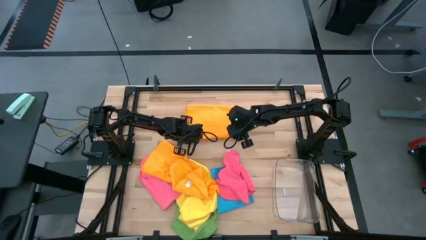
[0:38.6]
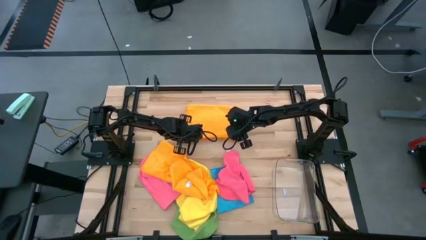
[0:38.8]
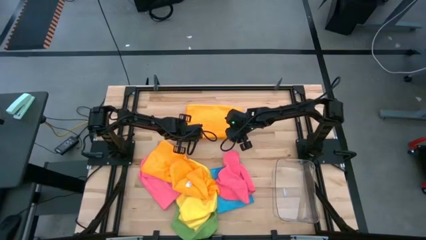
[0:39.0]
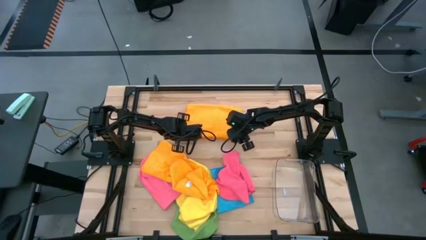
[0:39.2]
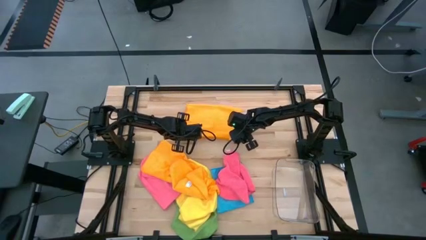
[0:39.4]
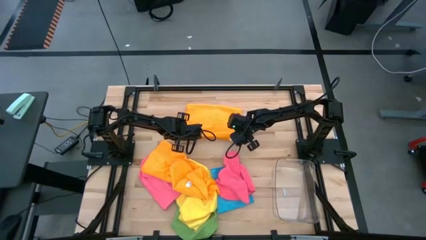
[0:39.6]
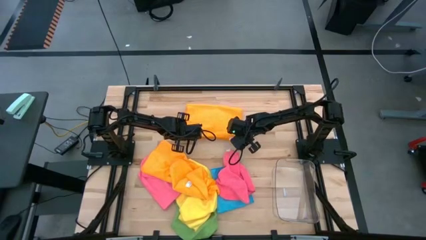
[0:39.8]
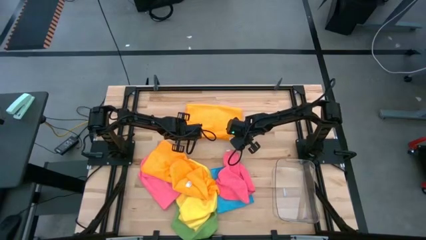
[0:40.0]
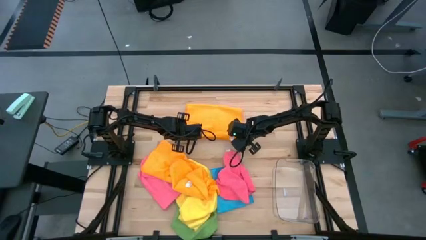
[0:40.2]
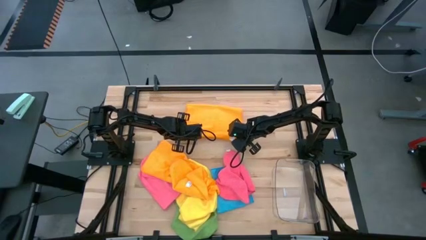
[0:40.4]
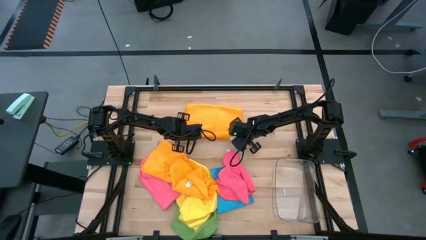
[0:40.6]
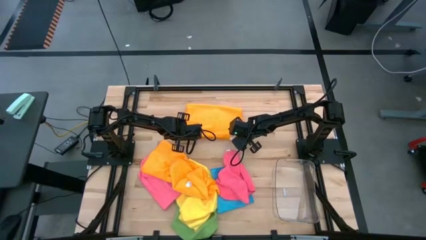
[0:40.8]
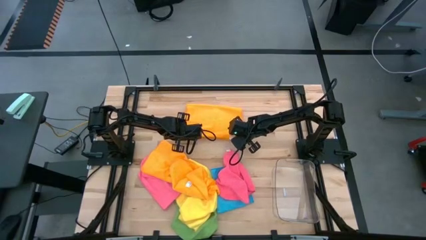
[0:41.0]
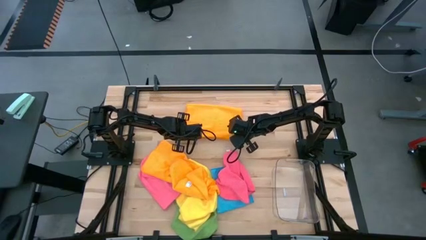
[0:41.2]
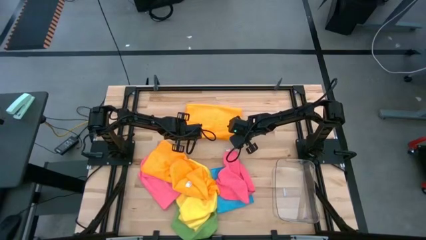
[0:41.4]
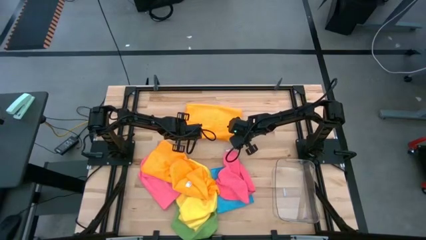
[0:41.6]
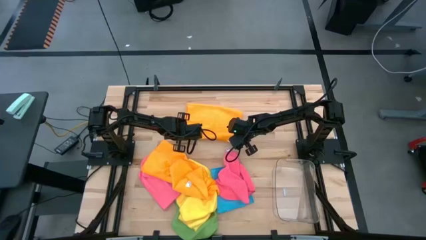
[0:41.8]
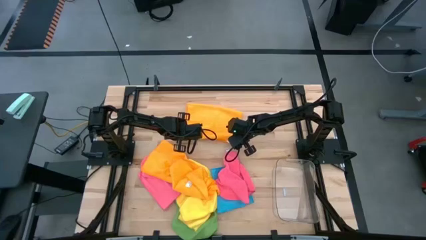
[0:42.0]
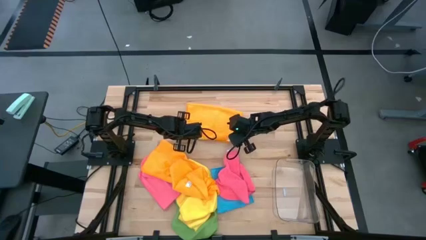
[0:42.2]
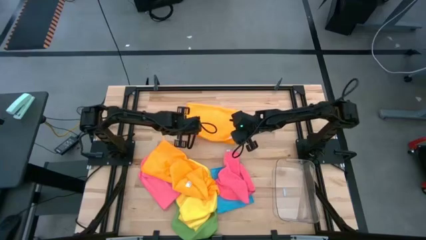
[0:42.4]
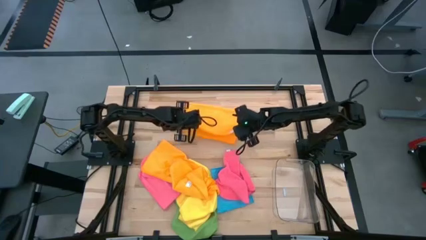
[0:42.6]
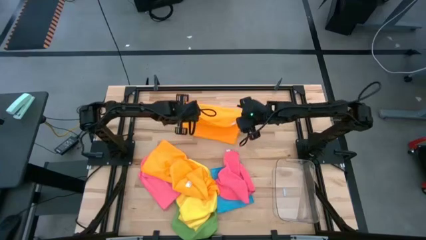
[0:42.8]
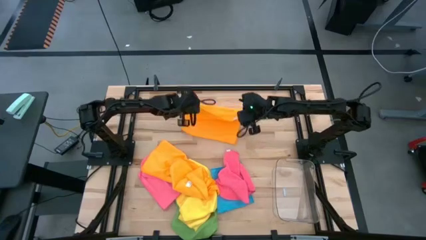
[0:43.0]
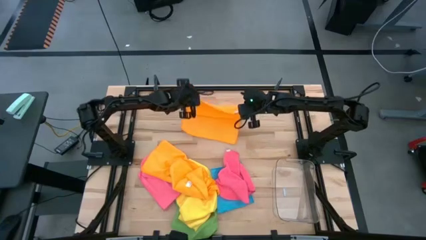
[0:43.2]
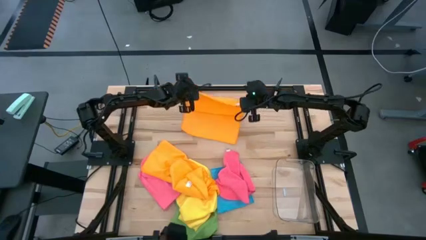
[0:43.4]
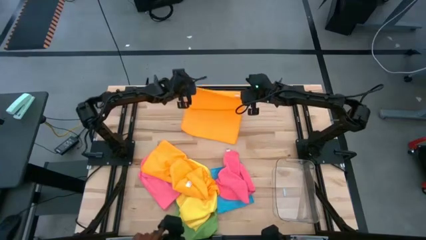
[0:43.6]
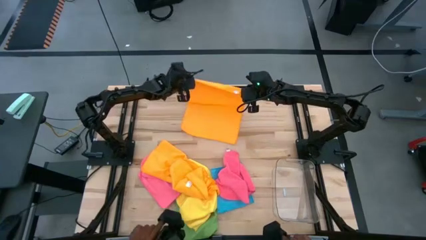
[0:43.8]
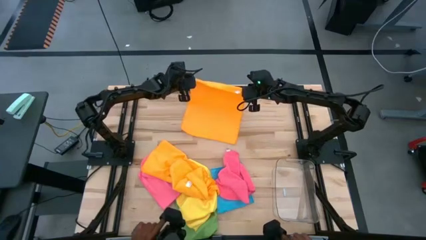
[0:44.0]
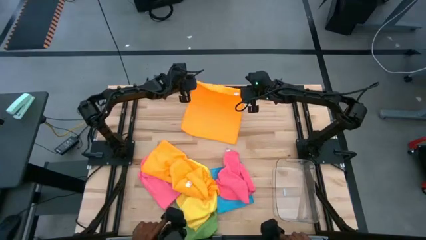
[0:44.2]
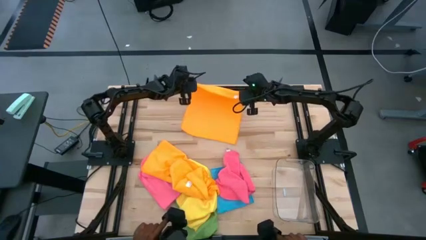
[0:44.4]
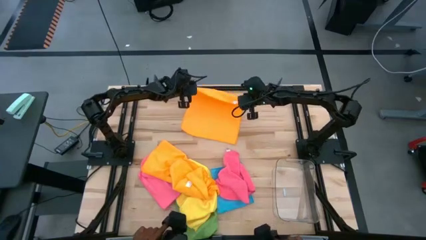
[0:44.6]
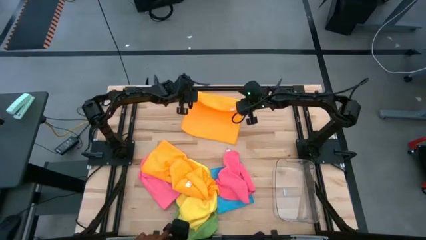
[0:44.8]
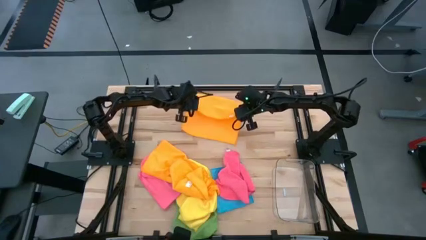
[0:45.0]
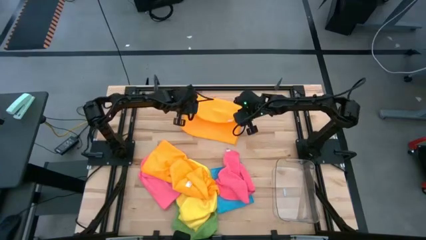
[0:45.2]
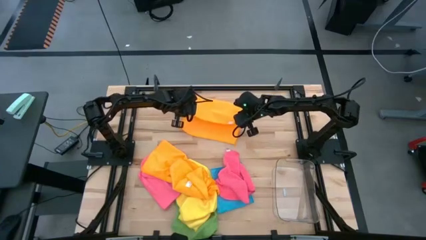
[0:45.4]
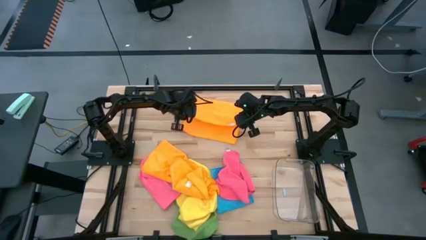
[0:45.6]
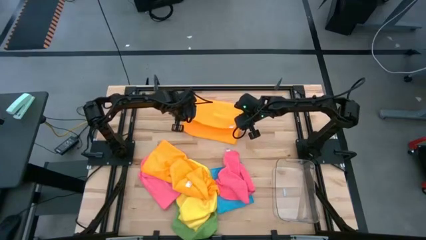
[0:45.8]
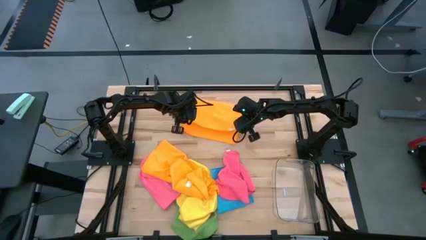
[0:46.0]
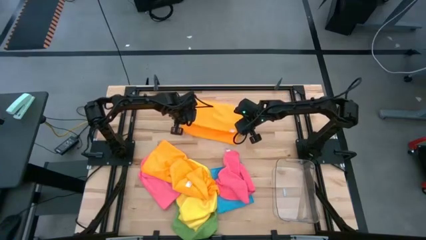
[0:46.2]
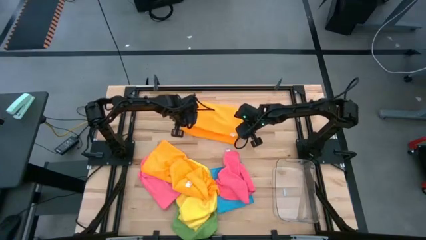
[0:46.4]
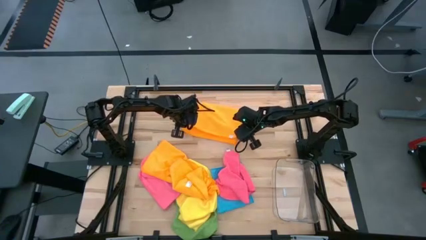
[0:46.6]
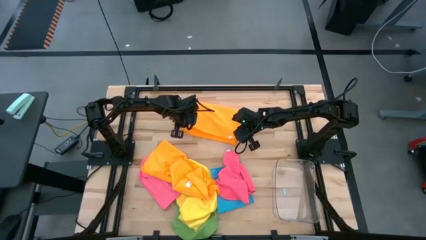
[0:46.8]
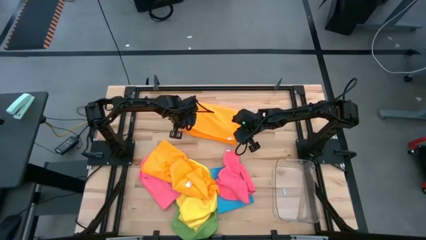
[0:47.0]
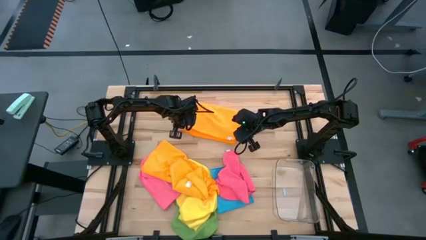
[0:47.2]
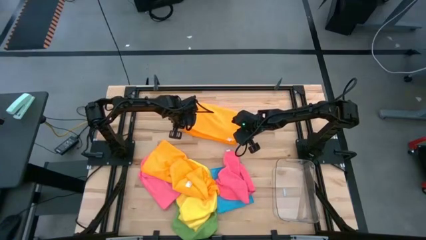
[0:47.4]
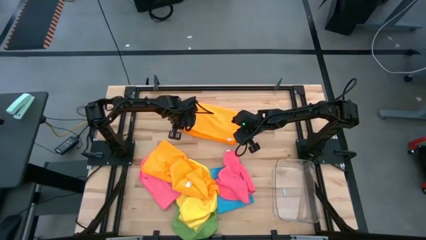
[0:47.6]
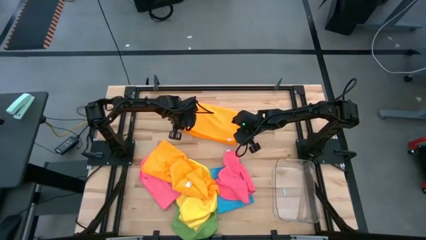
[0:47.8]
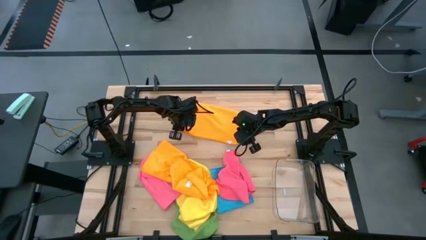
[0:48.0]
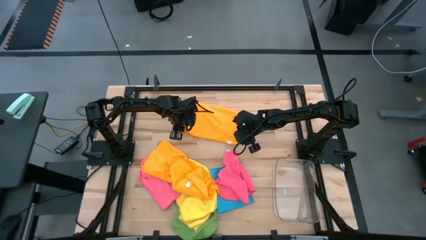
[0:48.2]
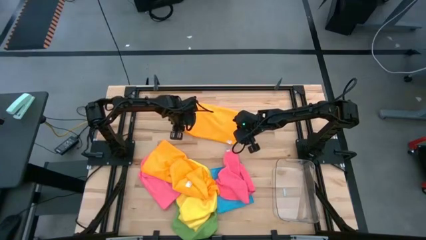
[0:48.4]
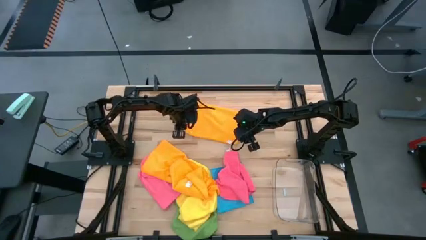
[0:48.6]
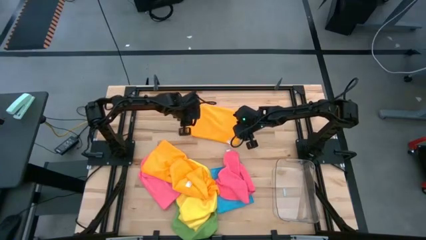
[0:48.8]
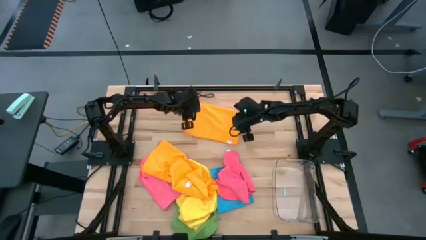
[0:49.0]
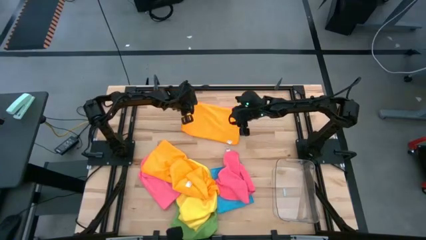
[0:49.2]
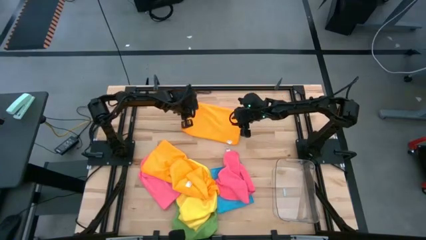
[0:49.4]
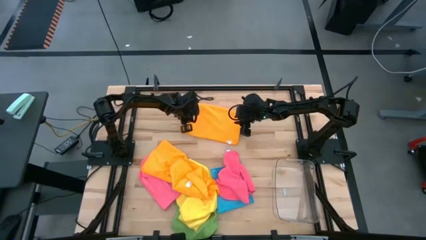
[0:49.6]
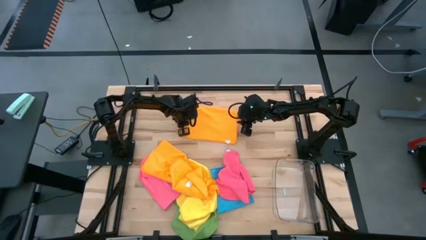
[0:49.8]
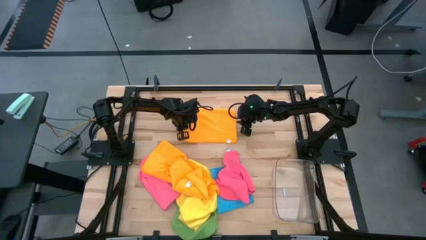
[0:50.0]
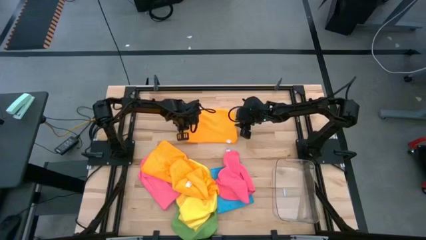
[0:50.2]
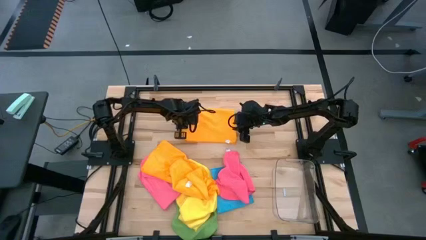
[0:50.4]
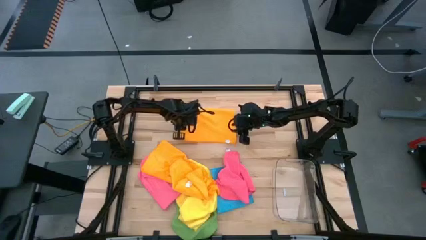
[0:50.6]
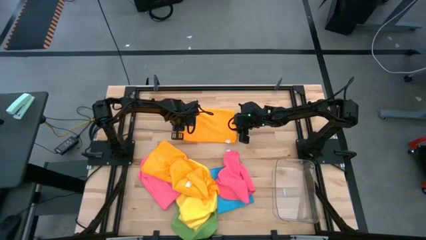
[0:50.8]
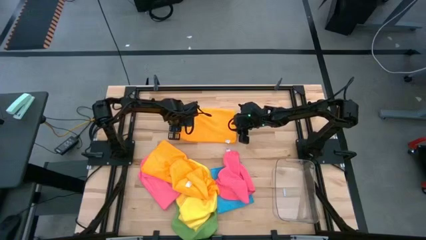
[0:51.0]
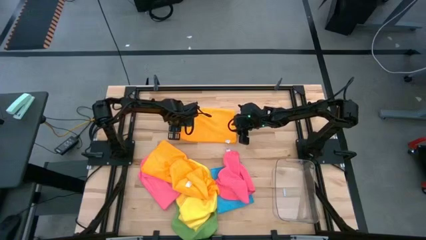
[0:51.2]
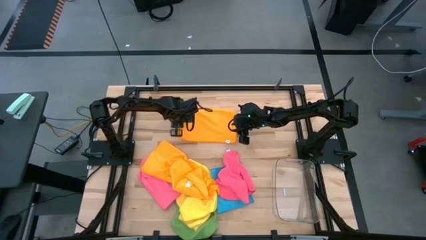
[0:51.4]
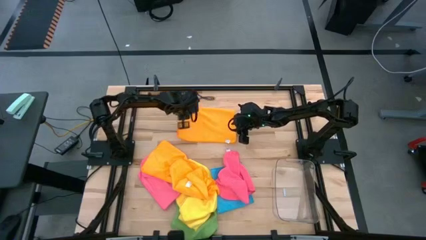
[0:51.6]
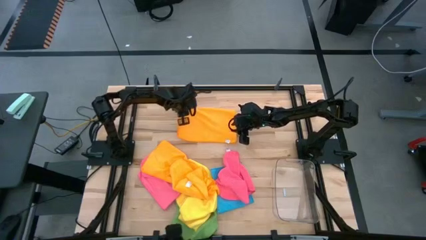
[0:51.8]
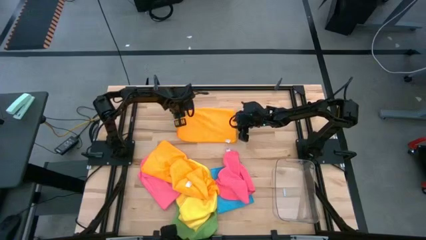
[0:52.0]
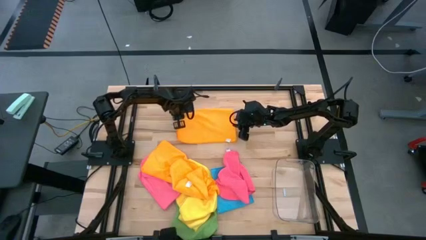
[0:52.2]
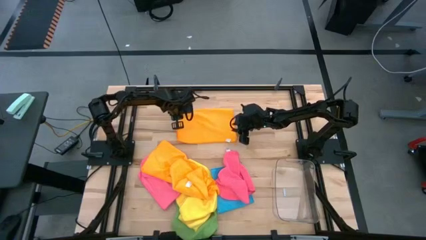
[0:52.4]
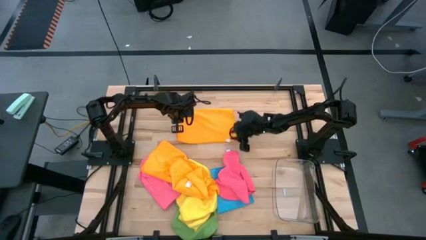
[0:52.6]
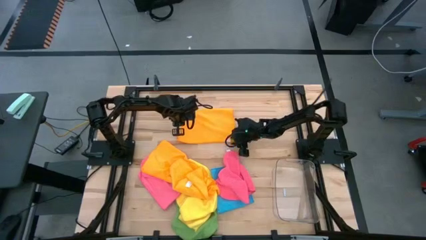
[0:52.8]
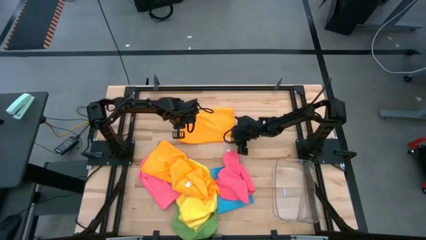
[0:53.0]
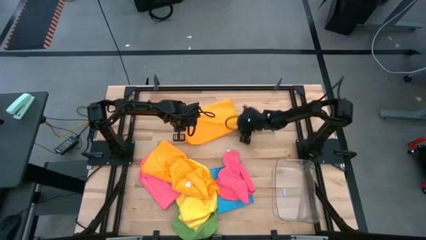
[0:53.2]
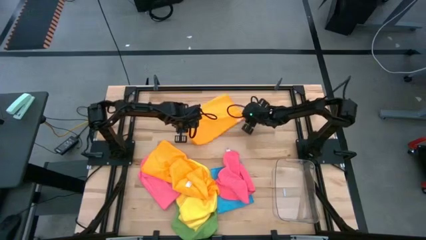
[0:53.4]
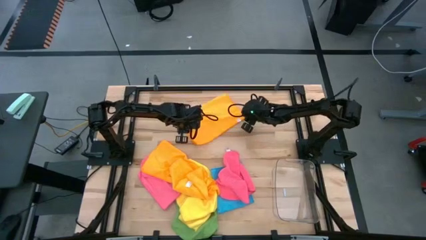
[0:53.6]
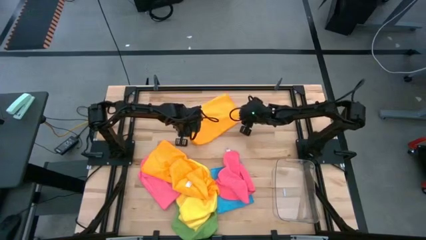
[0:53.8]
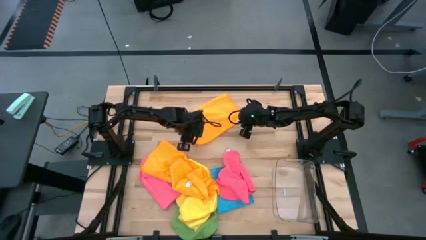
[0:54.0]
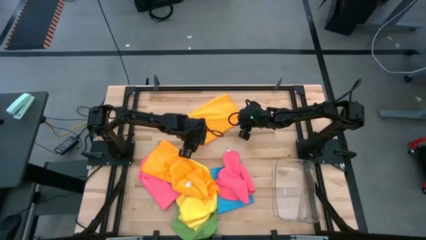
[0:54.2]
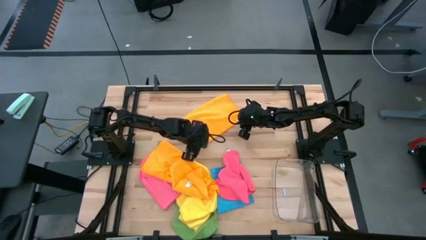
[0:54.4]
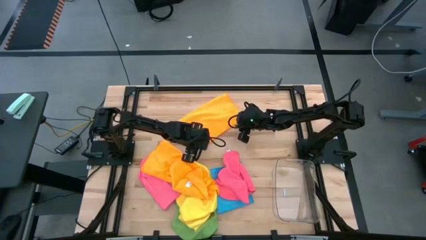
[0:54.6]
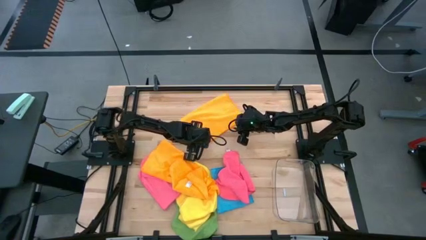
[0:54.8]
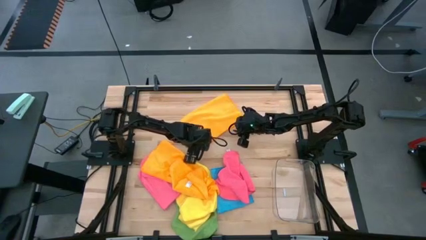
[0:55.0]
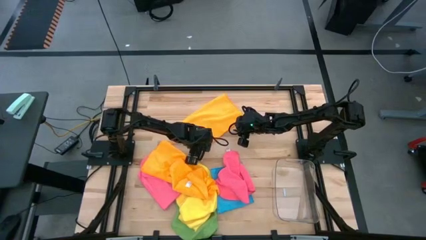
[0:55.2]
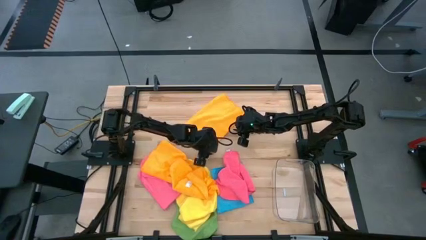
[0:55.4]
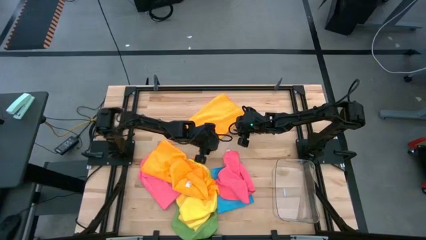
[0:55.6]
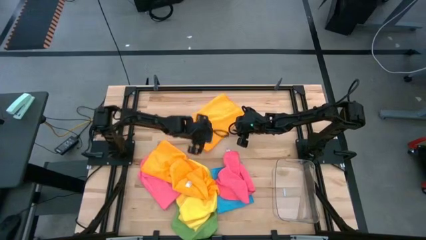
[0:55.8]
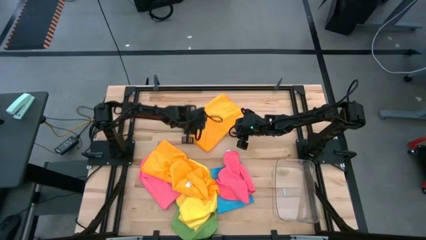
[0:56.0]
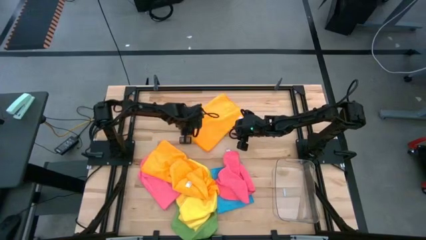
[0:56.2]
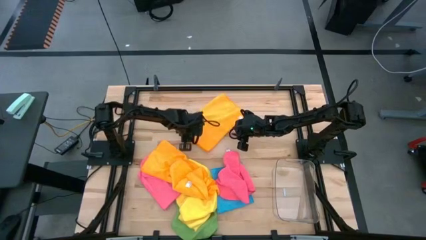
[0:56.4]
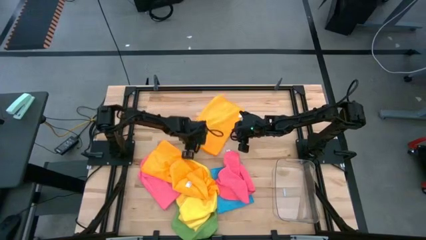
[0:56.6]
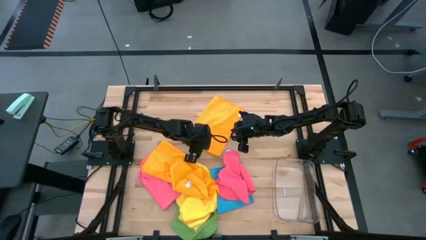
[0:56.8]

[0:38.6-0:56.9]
Task: Fold microfiber towels
Fold the orange towel
